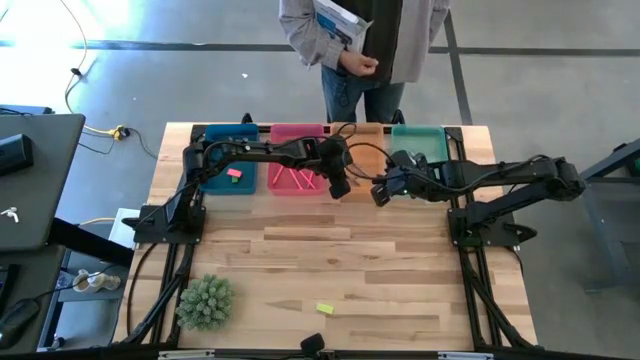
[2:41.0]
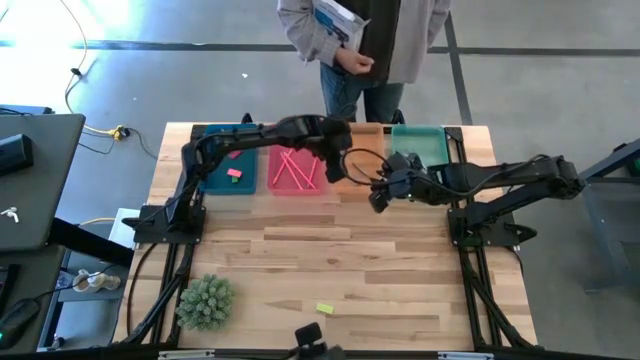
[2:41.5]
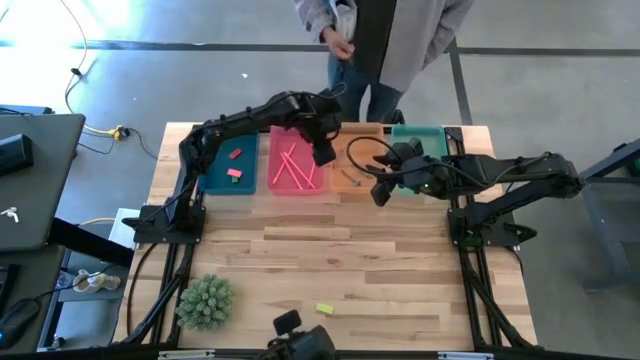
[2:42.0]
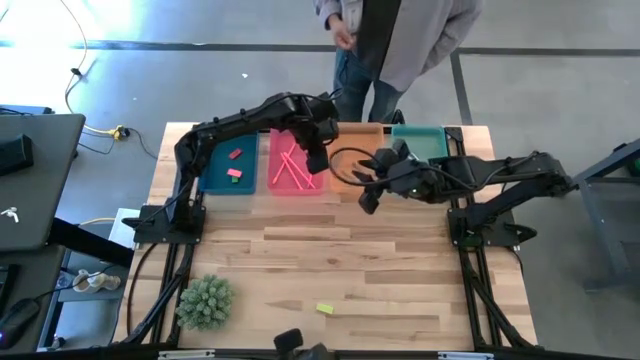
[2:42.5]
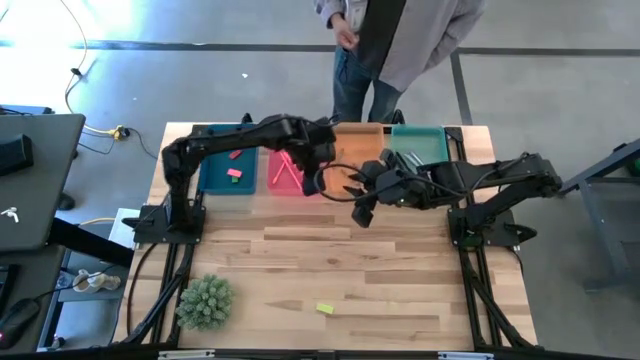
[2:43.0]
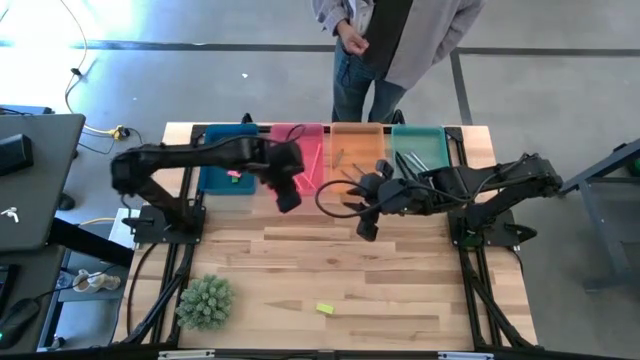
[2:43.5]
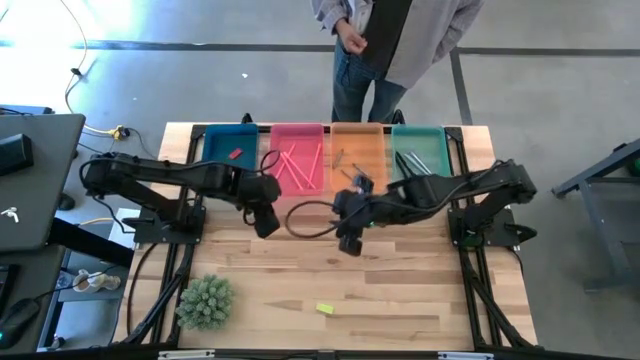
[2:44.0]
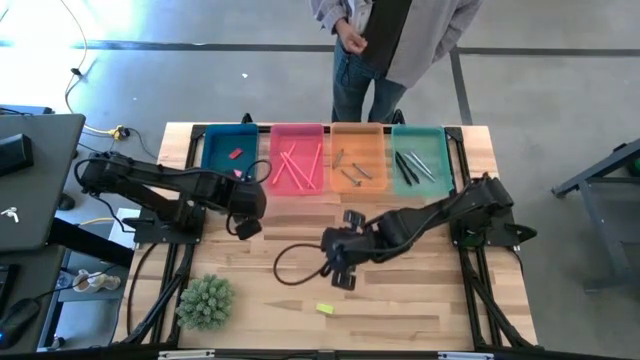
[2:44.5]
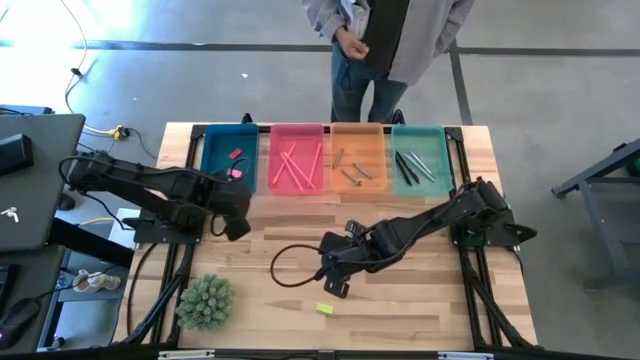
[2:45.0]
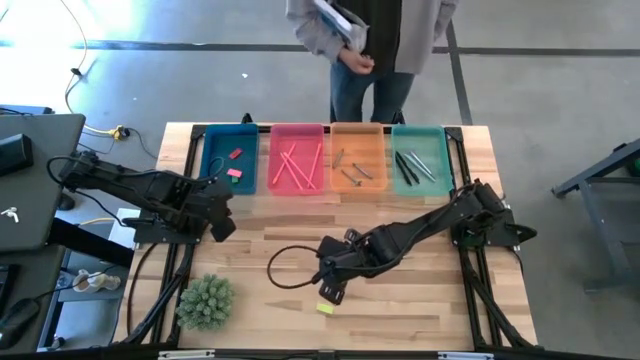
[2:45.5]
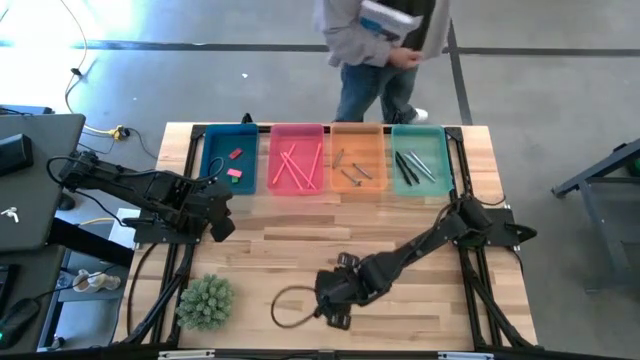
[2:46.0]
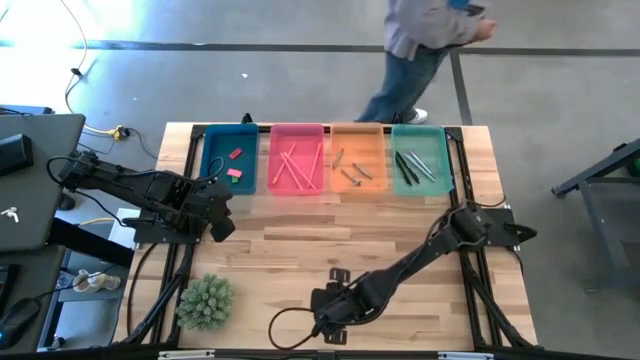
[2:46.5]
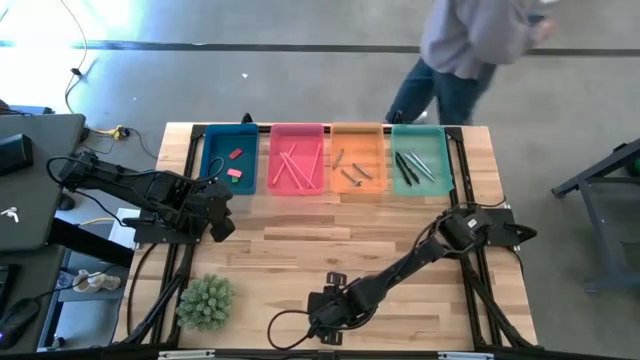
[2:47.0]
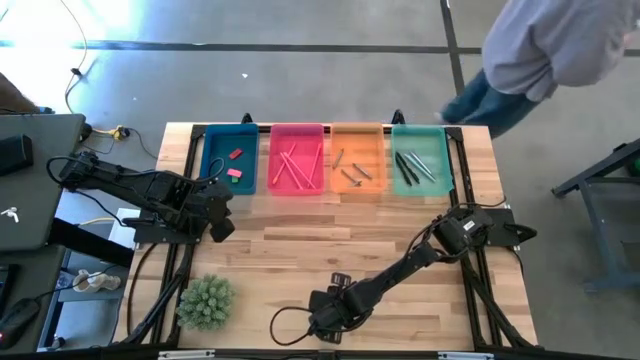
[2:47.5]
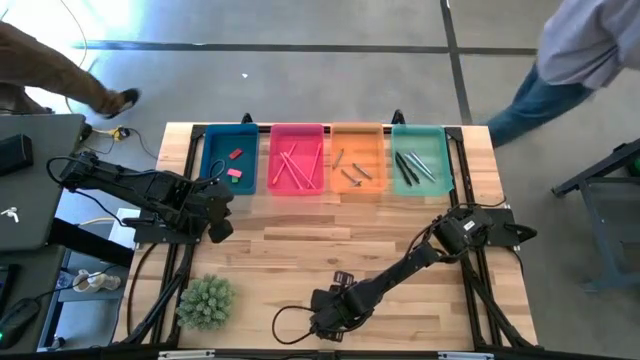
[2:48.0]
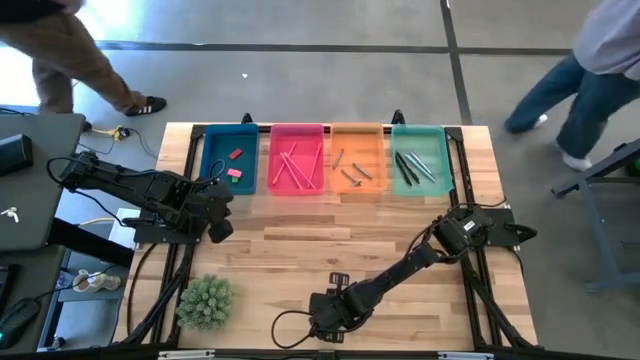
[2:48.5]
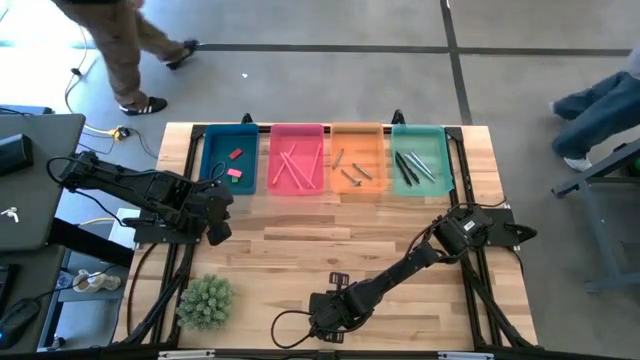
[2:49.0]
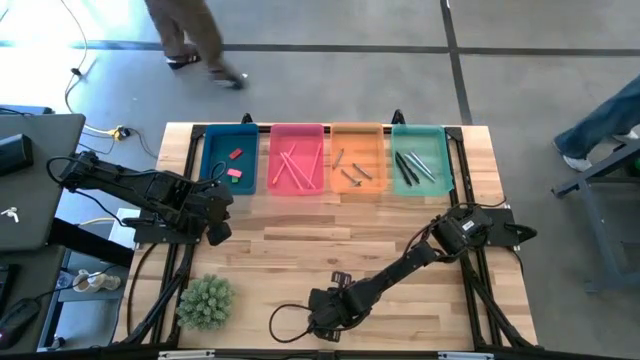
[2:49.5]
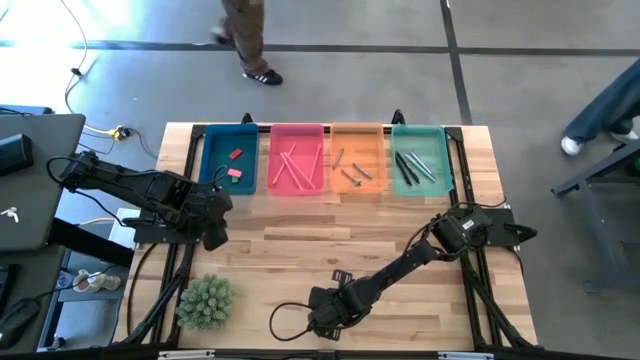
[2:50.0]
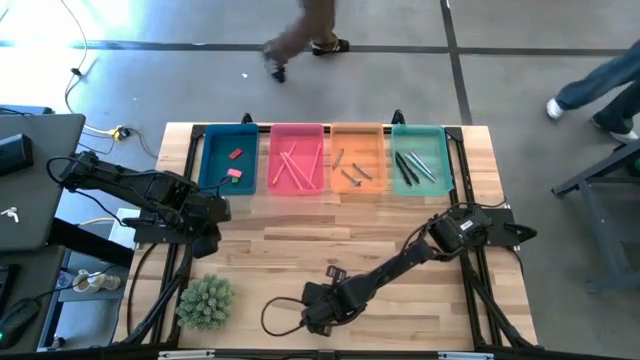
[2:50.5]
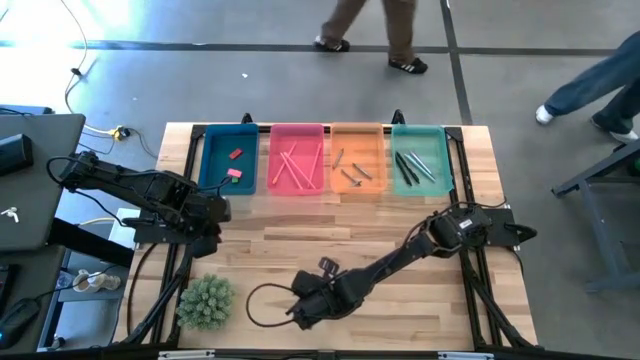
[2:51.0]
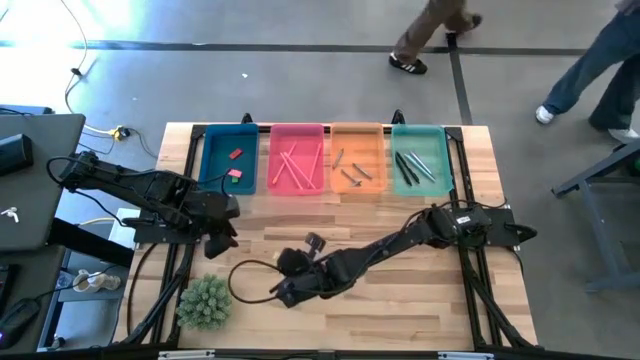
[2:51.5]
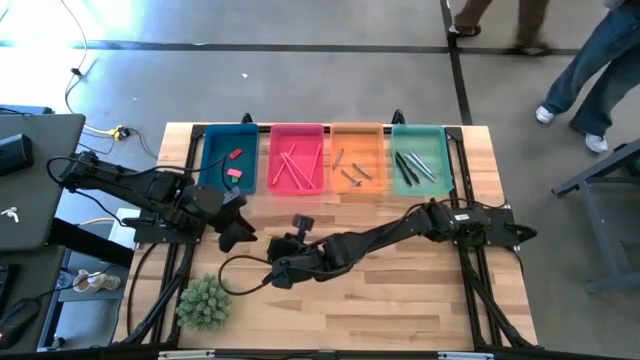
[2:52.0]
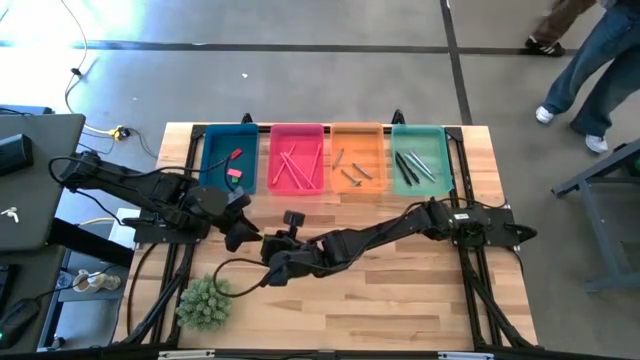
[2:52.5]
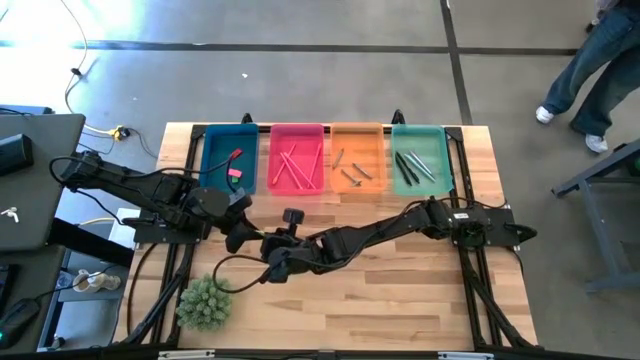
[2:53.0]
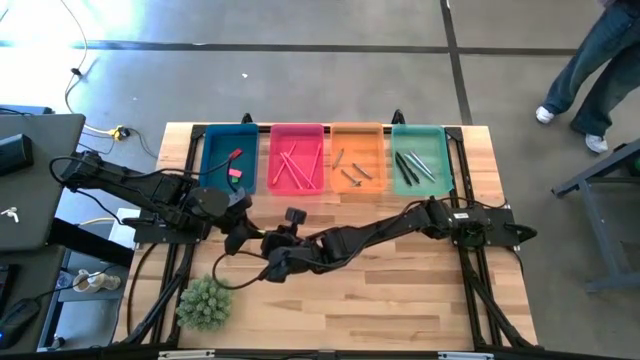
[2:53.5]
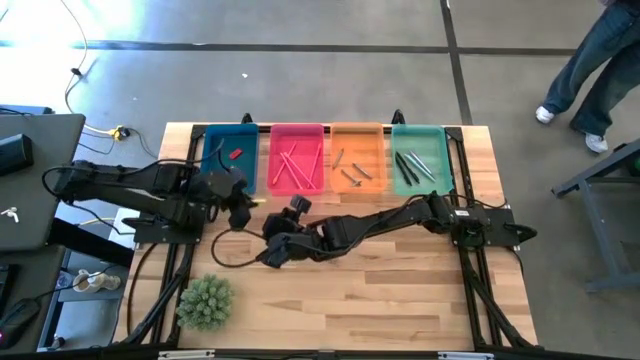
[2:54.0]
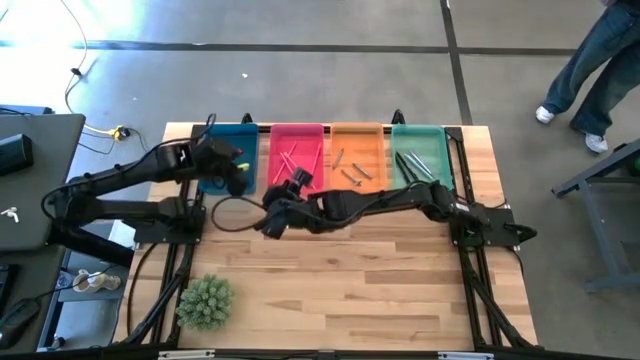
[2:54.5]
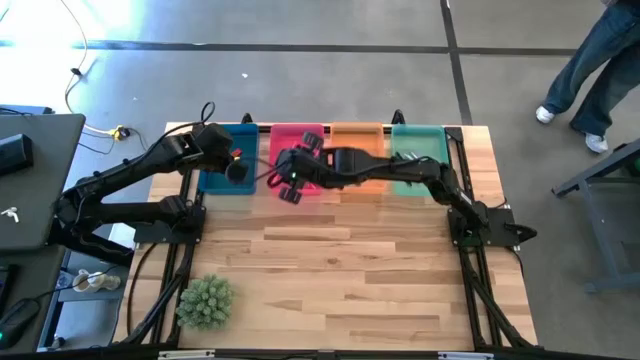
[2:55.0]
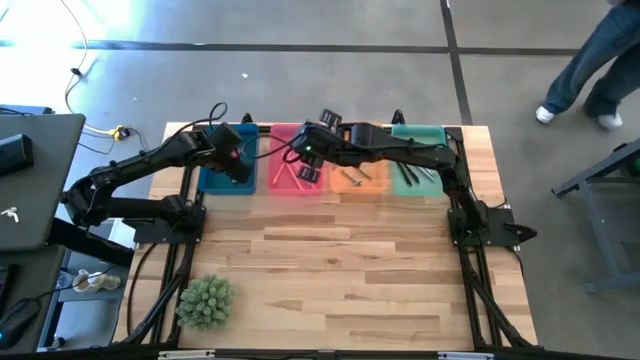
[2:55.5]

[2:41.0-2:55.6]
Task: Sort crayons/erasers/pens/pencils in bins
Put the light green eraser into the blue bin

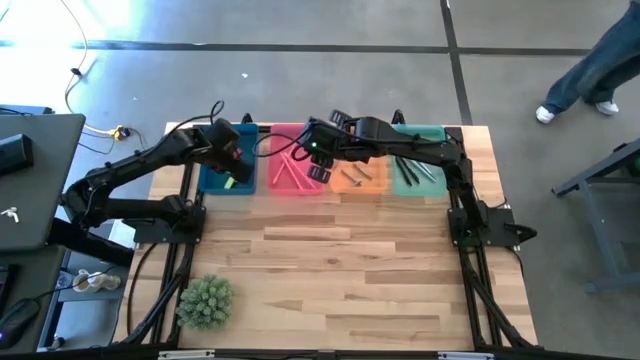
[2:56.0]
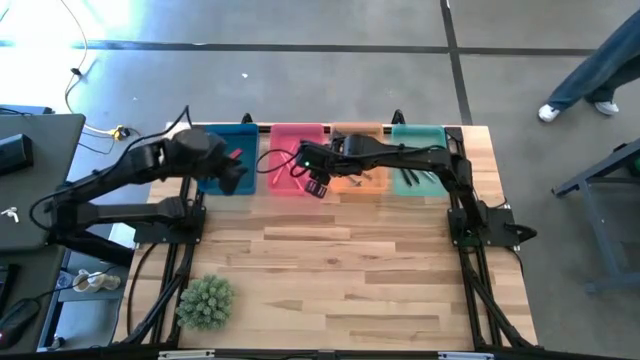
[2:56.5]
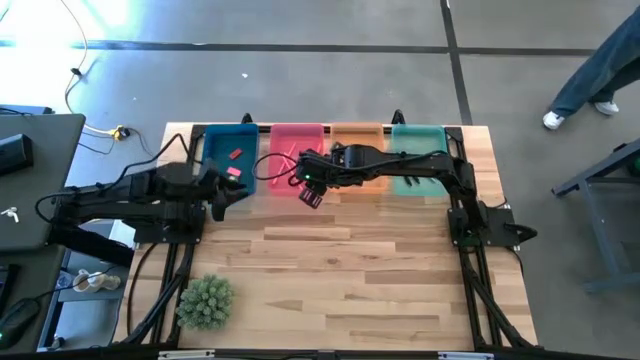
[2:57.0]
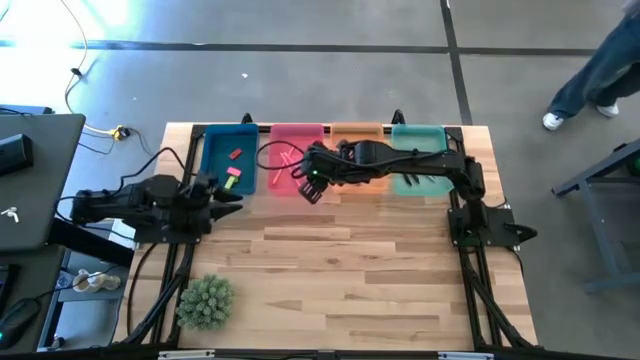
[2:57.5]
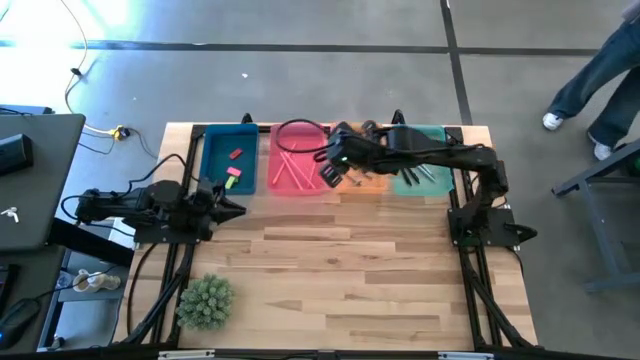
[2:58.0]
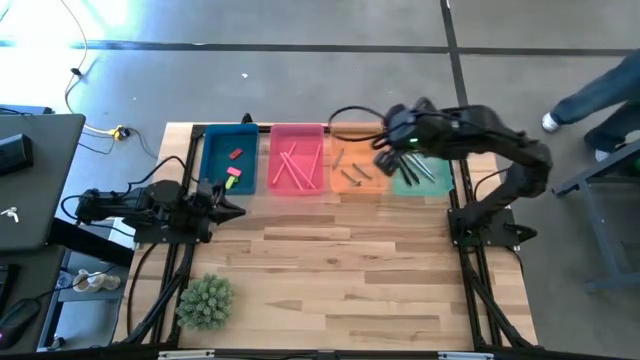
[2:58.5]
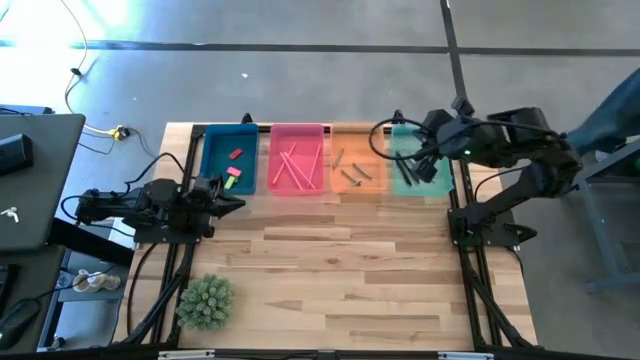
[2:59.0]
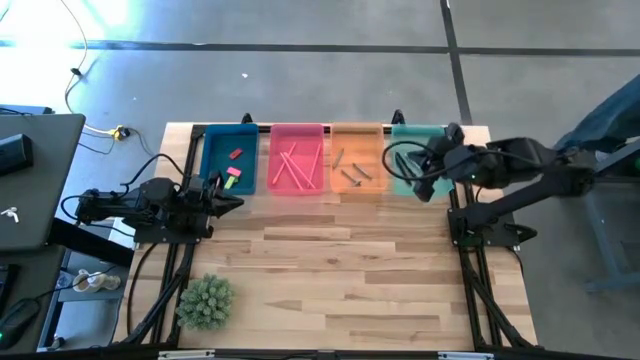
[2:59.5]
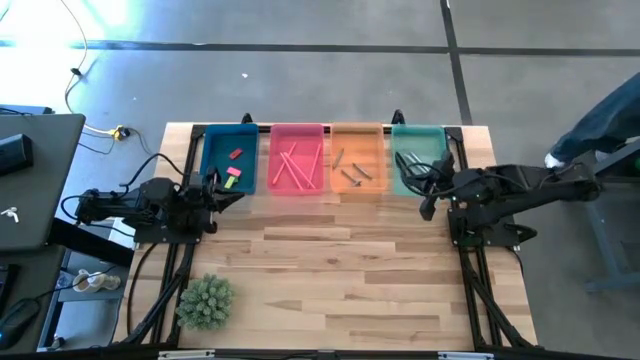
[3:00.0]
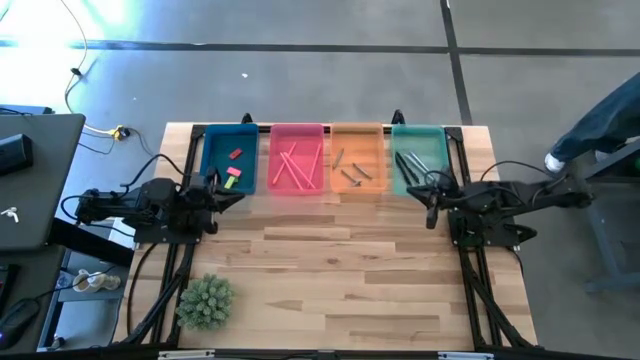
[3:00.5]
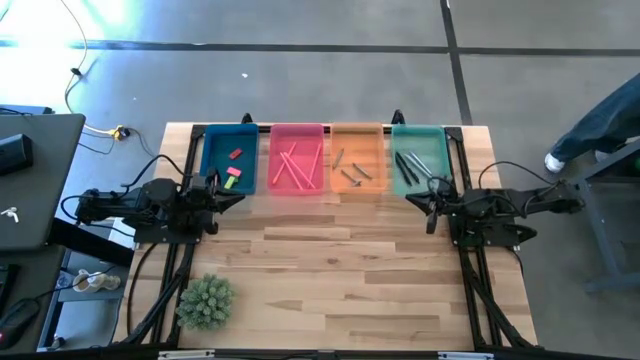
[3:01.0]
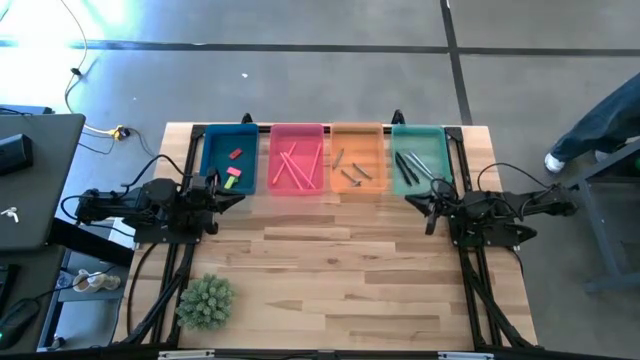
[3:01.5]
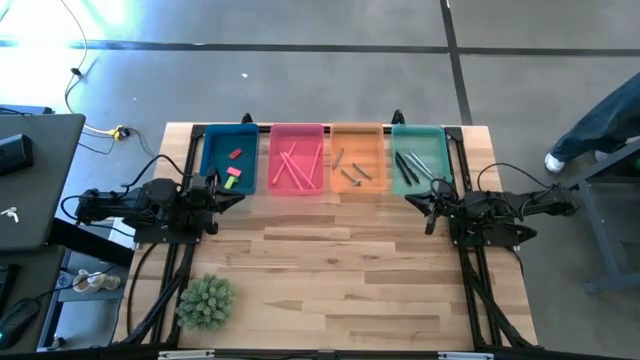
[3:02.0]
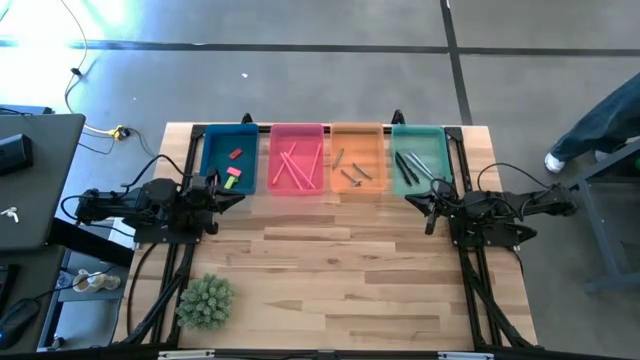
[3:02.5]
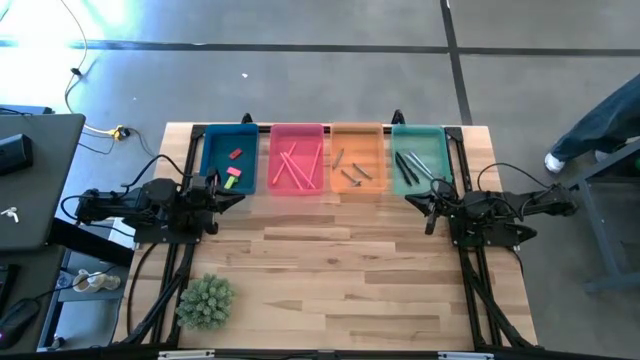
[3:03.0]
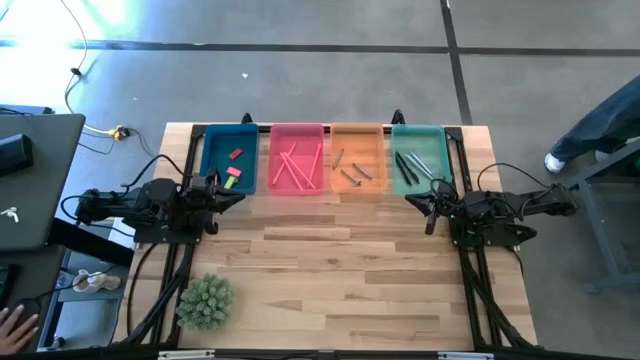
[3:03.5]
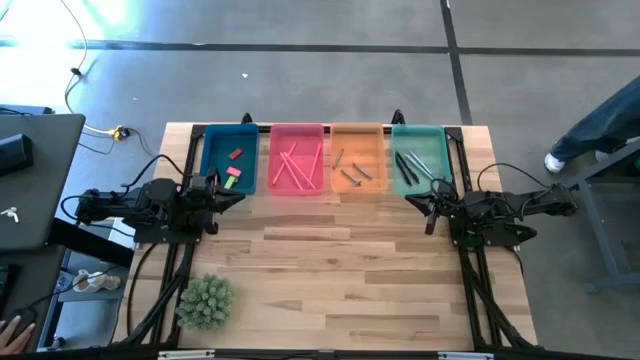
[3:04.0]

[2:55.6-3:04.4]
Return to Home Position
